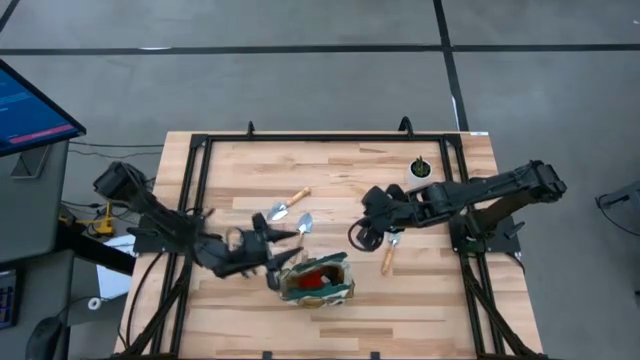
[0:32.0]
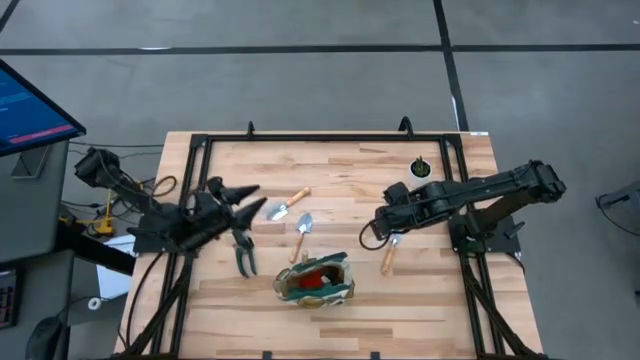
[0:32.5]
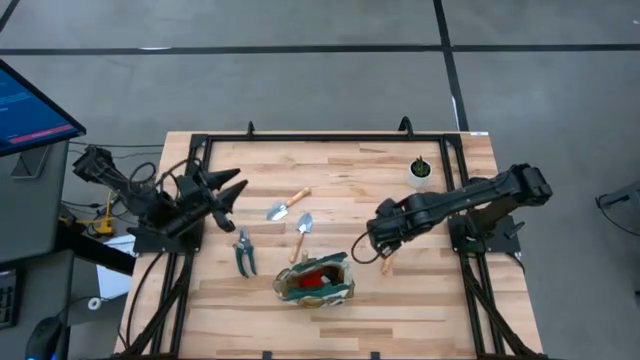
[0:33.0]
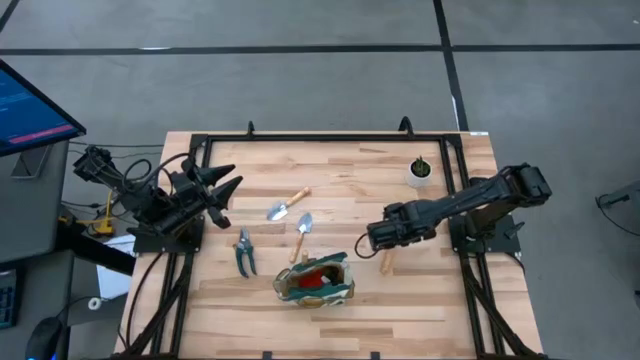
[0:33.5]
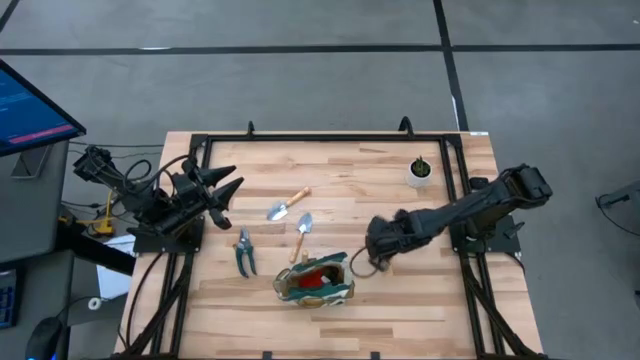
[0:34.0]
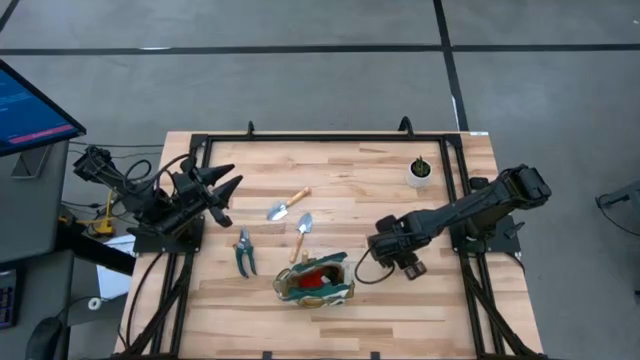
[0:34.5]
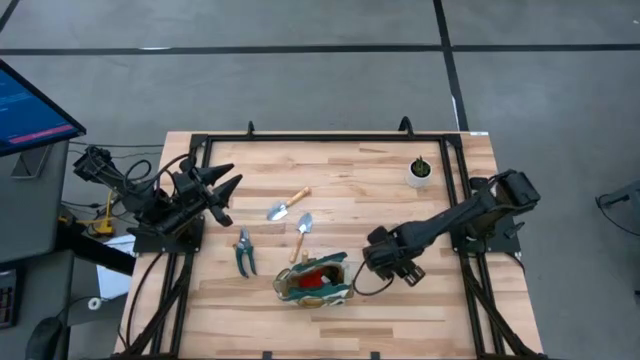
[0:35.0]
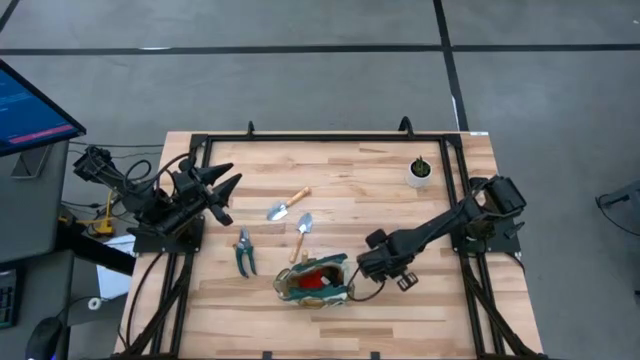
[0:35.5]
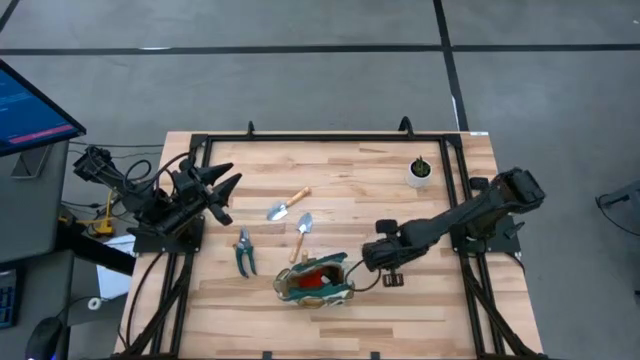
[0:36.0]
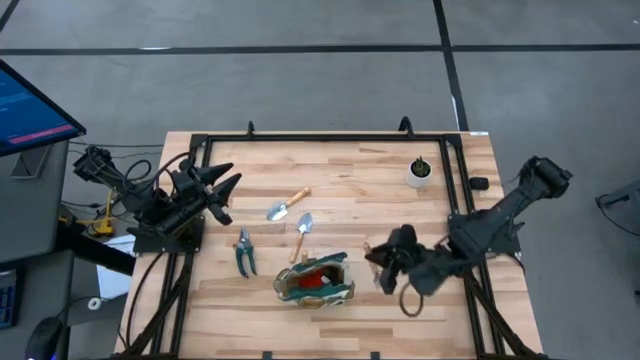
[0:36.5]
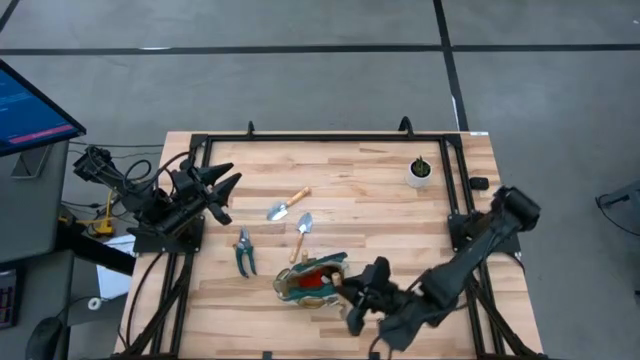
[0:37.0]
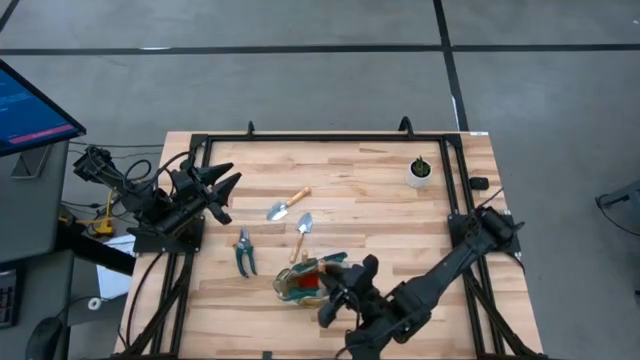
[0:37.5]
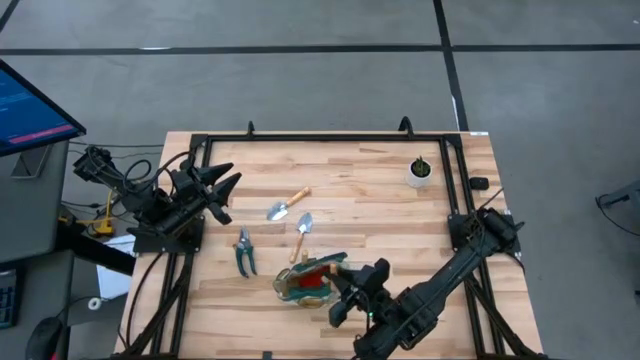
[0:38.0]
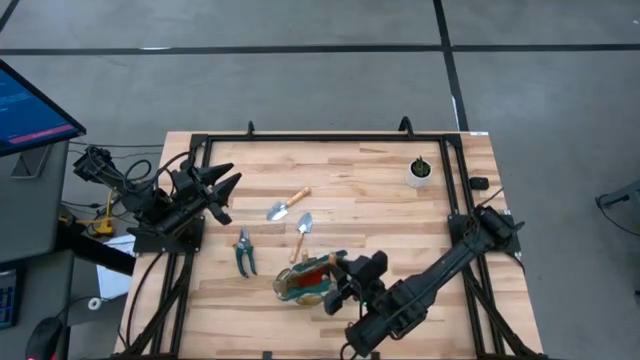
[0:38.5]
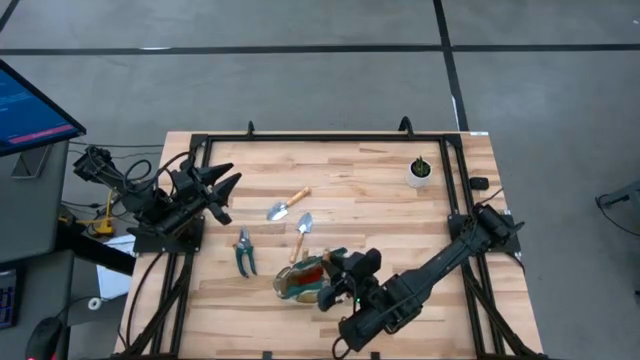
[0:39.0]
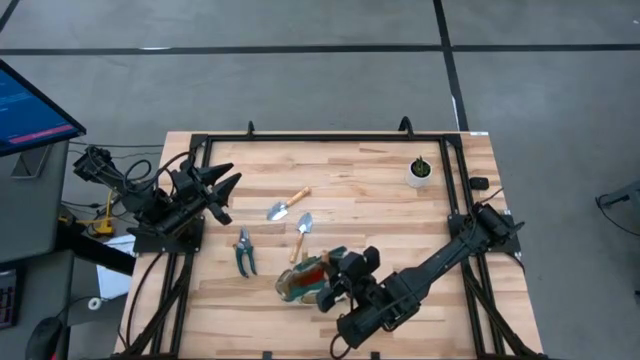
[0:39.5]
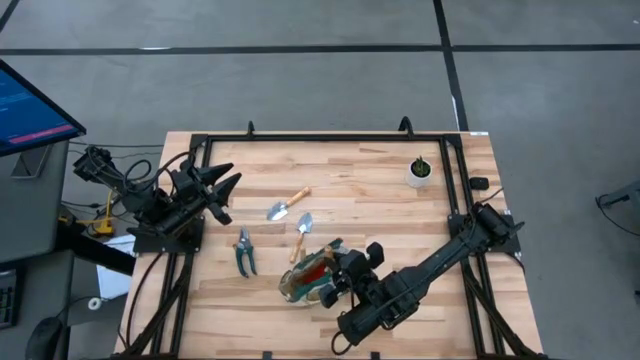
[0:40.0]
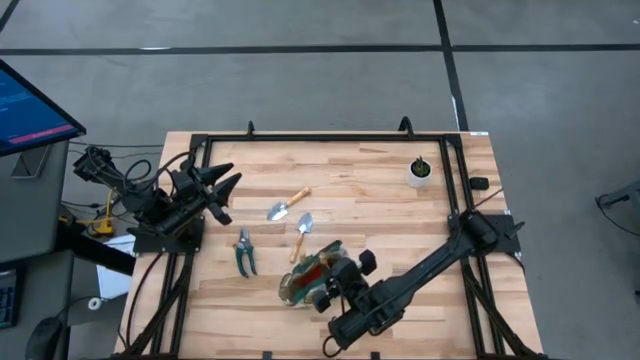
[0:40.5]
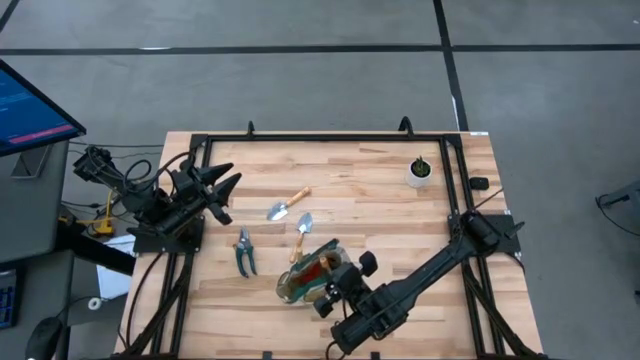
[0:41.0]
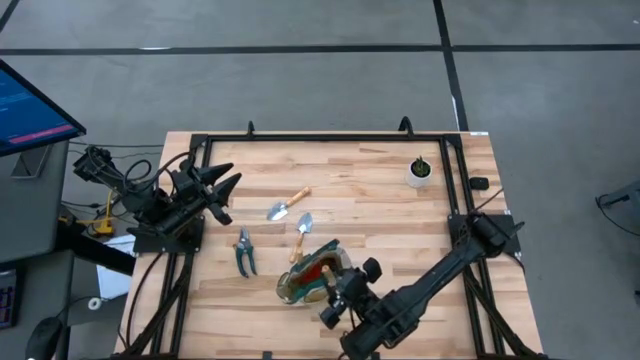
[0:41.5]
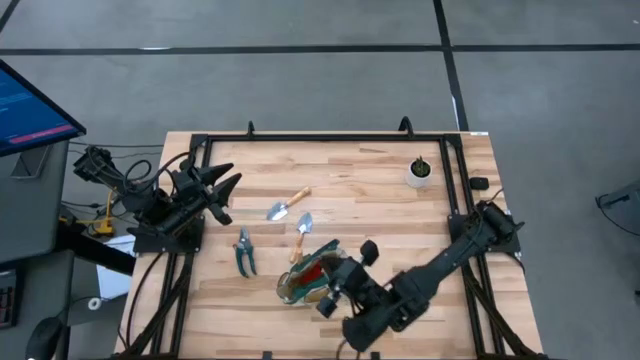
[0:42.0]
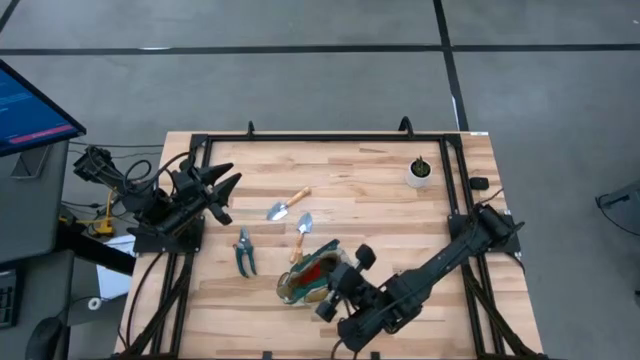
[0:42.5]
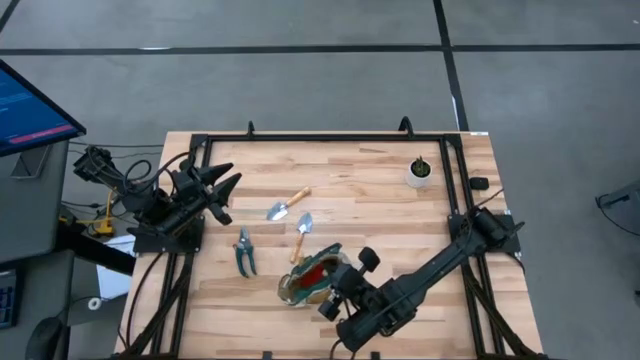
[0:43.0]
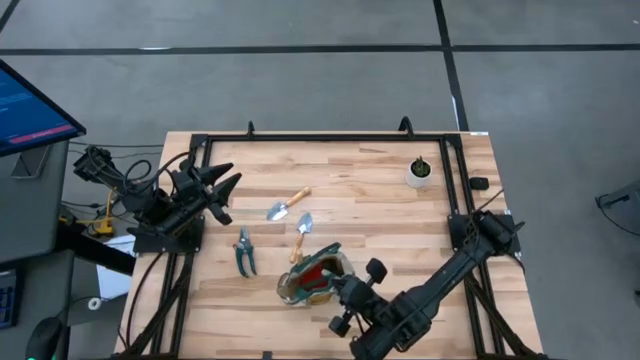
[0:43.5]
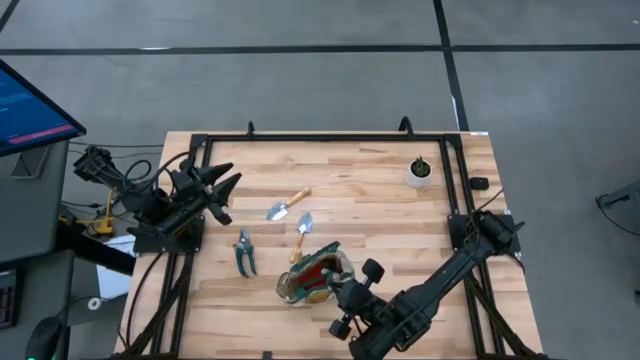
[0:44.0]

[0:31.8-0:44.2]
Task: Pick & Place Garden tools in Gardening bag
Put the brown trowel into the gardening bag pocket

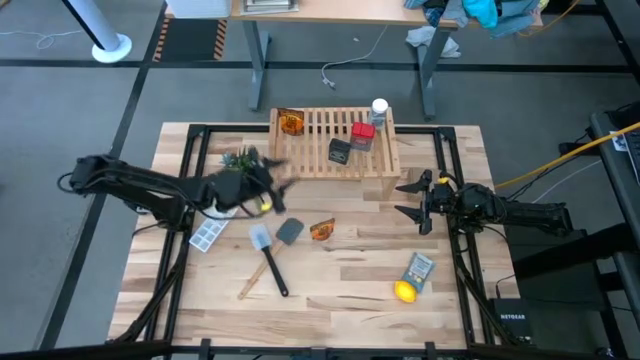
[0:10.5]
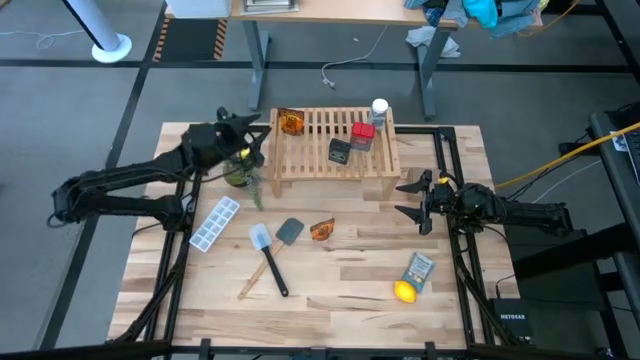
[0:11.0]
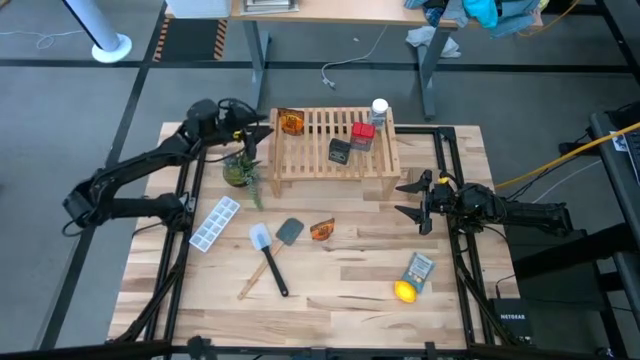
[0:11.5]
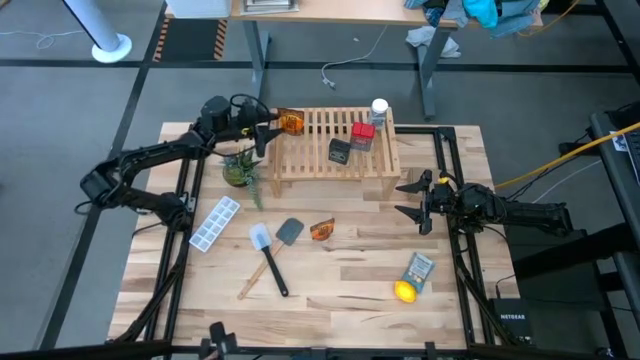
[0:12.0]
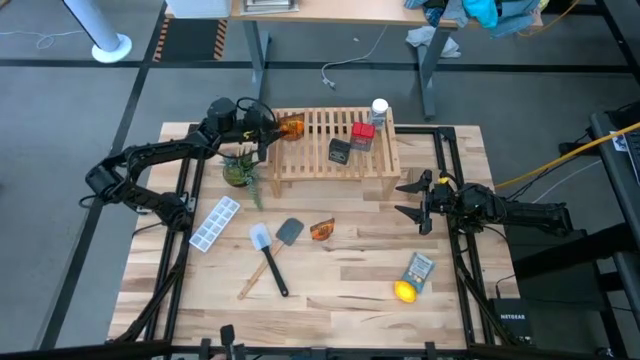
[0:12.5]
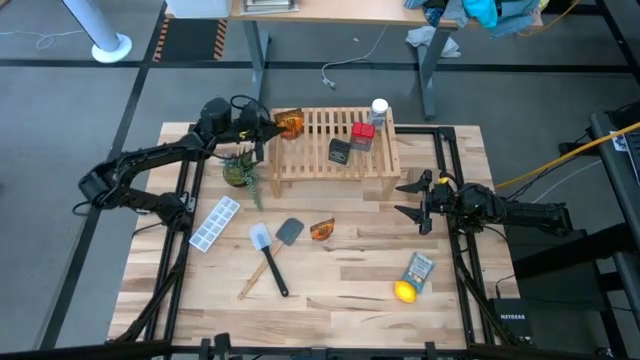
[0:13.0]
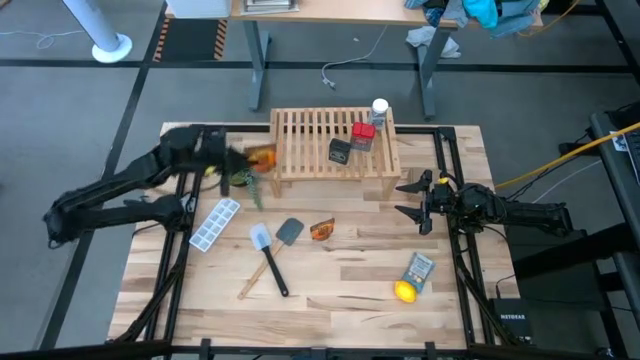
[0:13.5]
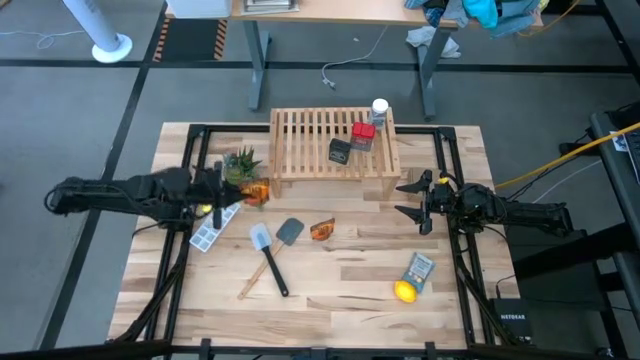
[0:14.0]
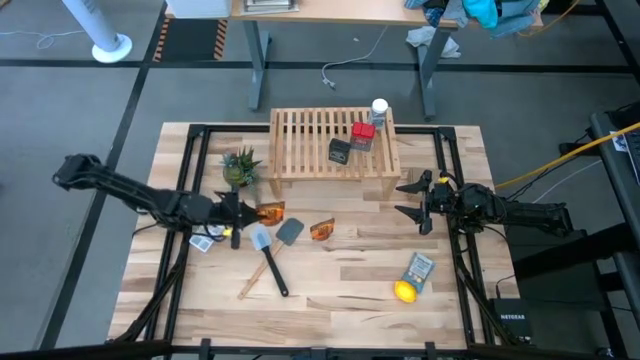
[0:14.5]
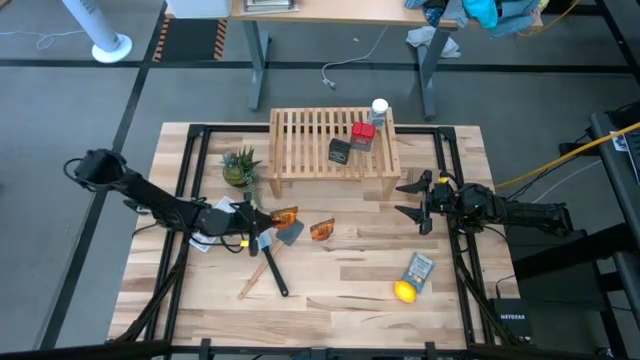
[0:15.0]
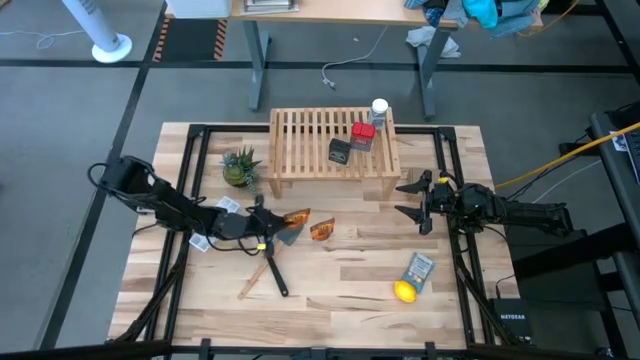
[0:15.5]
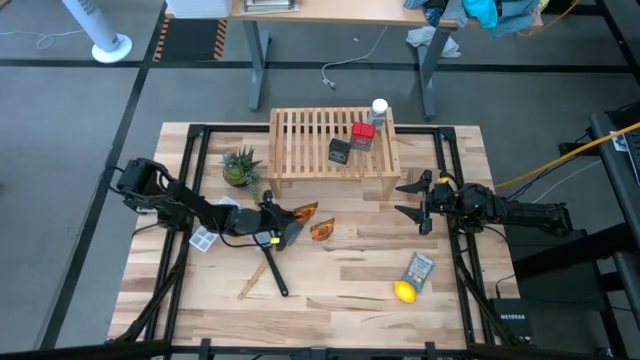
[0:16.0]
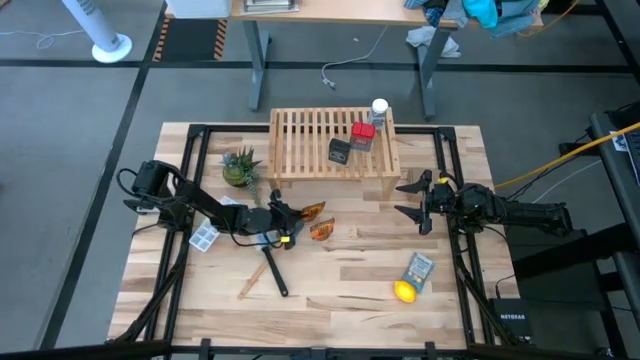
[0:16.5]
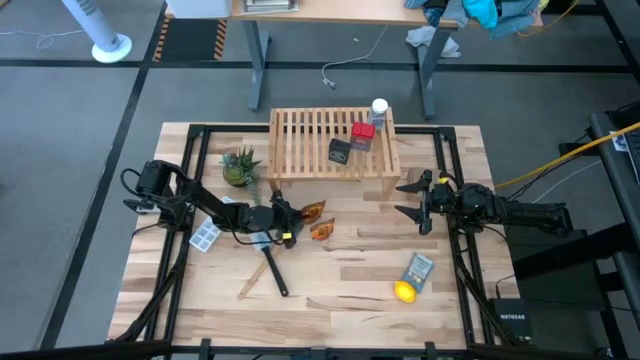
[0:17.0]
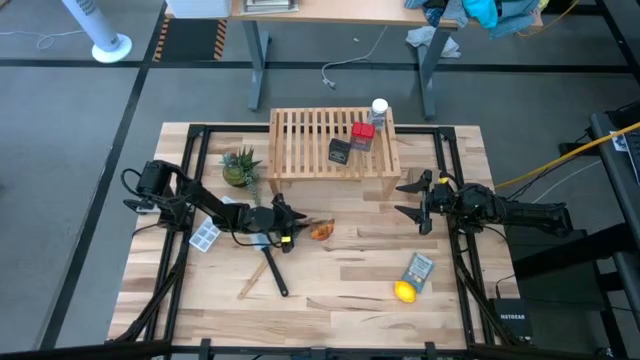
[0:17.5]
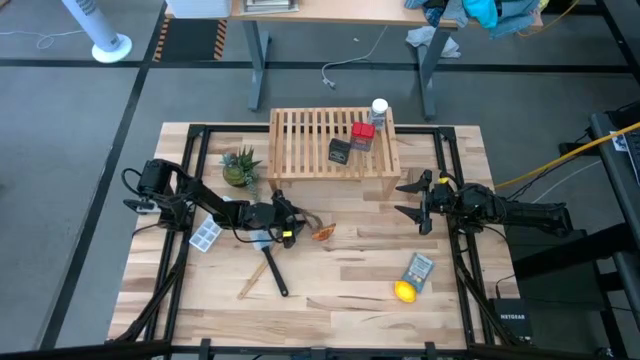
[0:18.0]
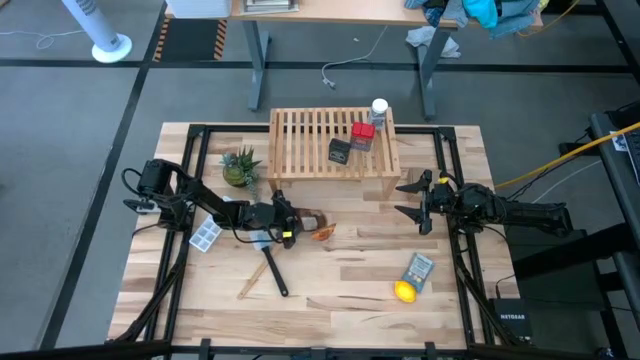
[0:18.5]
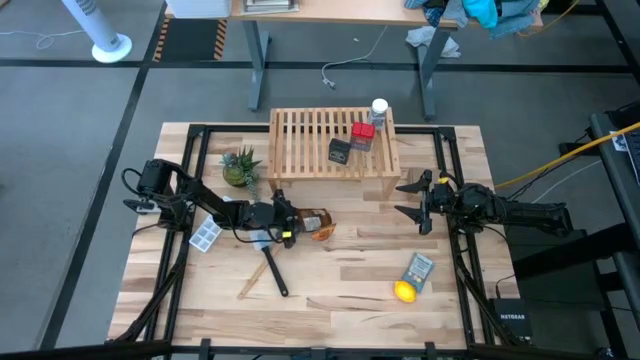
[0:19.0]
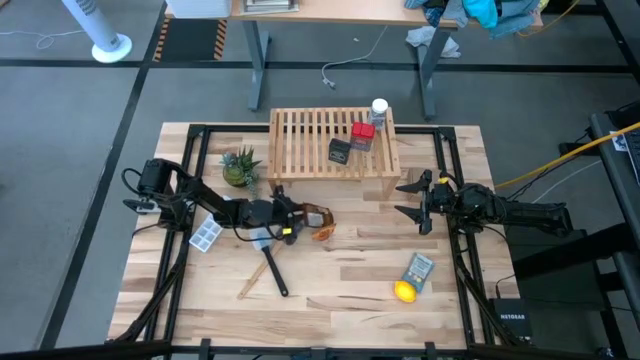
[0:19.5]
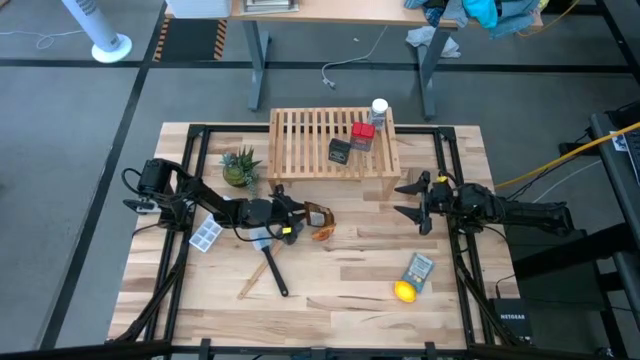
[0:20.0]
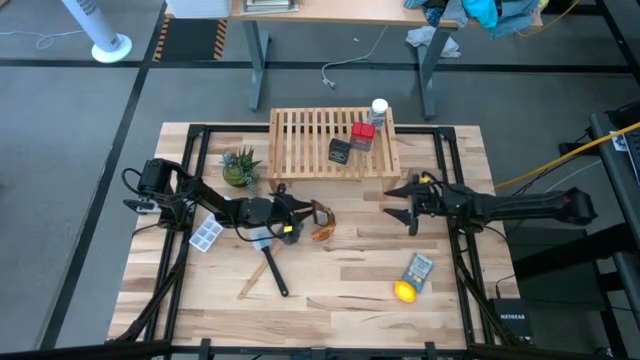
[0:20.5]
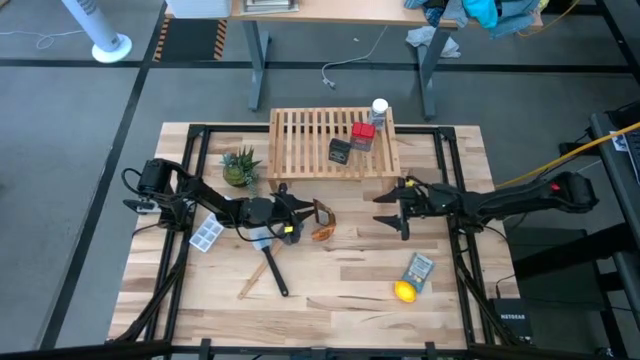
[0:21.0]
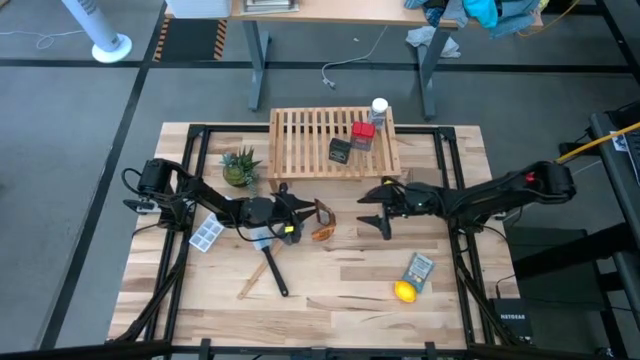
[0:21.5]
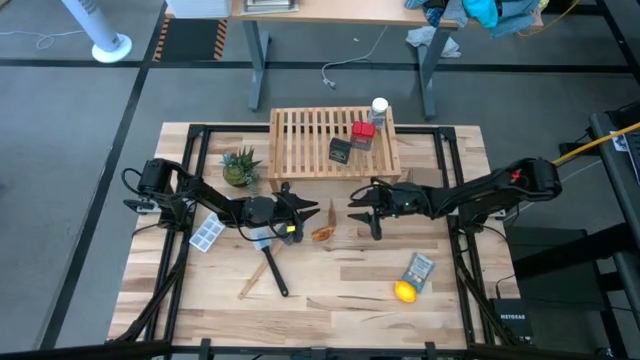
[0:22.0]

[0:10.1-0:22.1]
Task: Shelf spices
Remove the orange seasoning pack from the shelf
